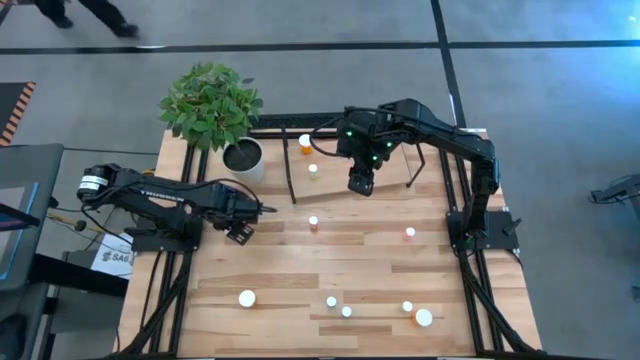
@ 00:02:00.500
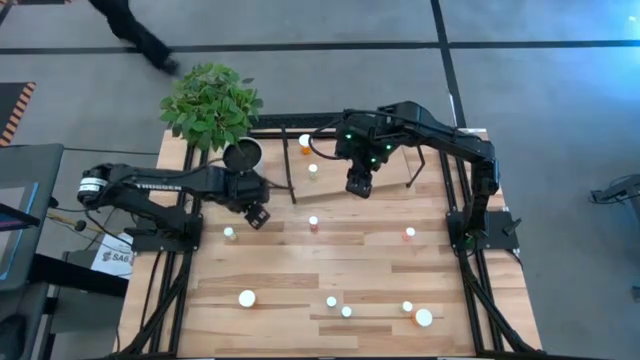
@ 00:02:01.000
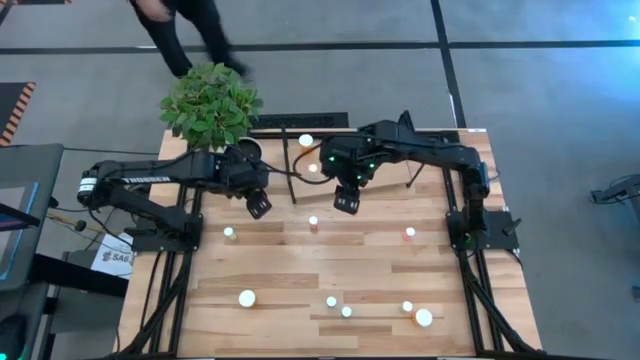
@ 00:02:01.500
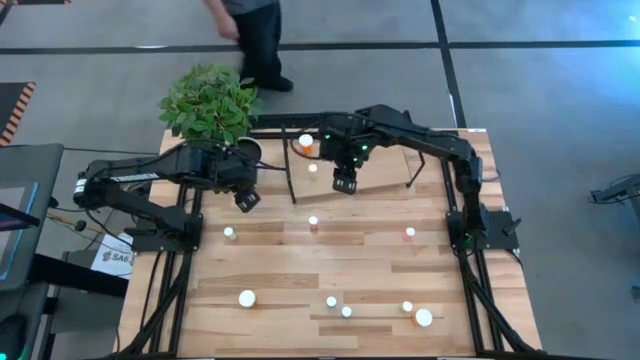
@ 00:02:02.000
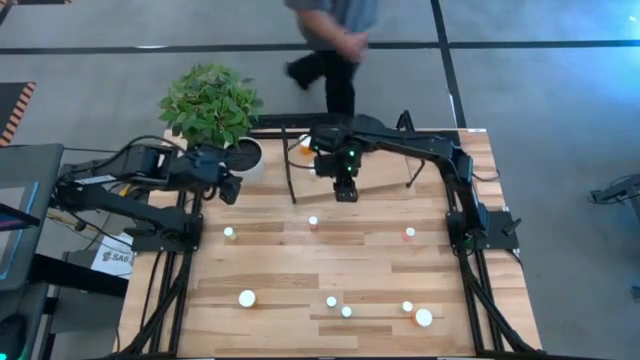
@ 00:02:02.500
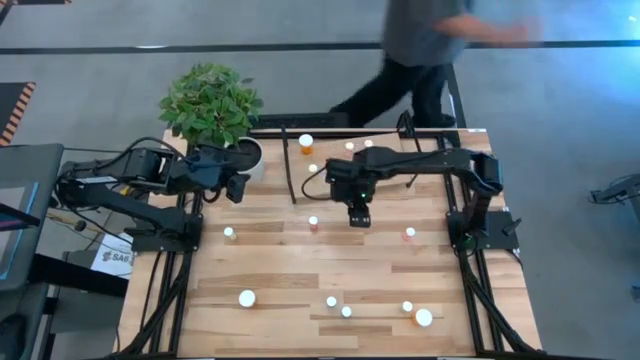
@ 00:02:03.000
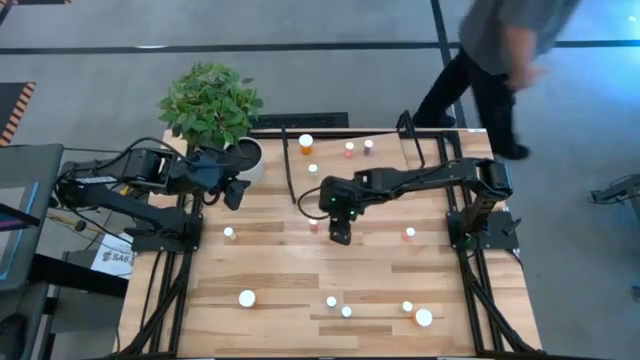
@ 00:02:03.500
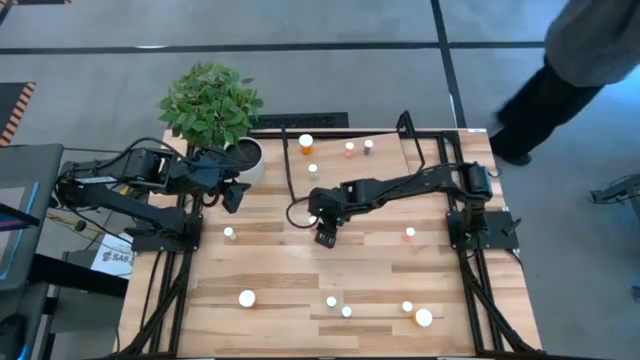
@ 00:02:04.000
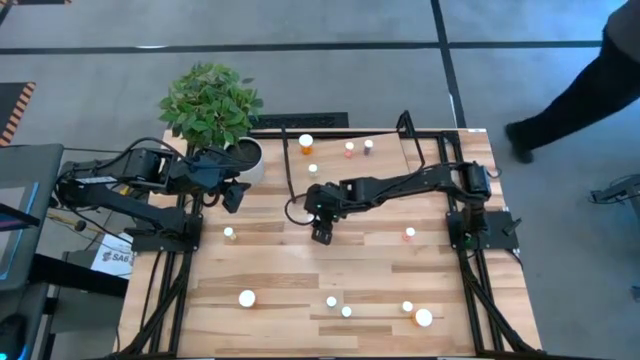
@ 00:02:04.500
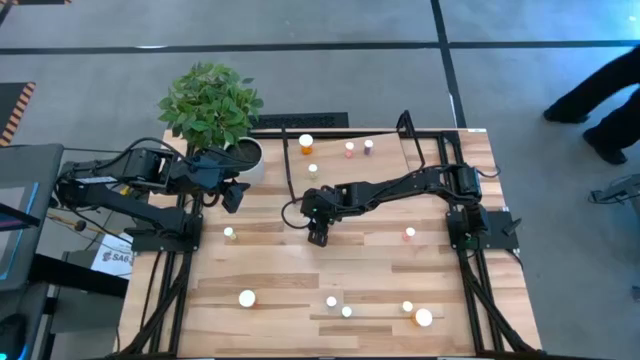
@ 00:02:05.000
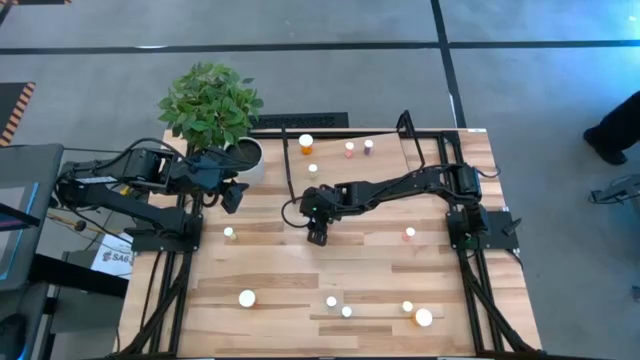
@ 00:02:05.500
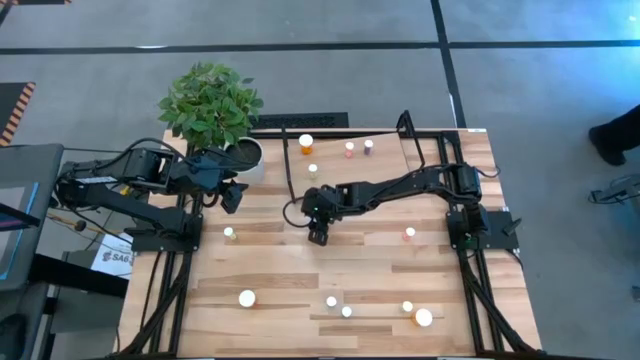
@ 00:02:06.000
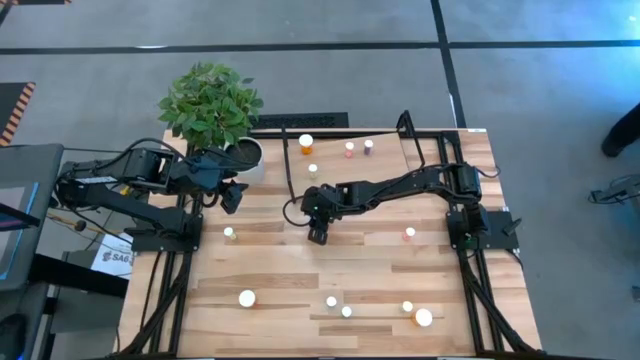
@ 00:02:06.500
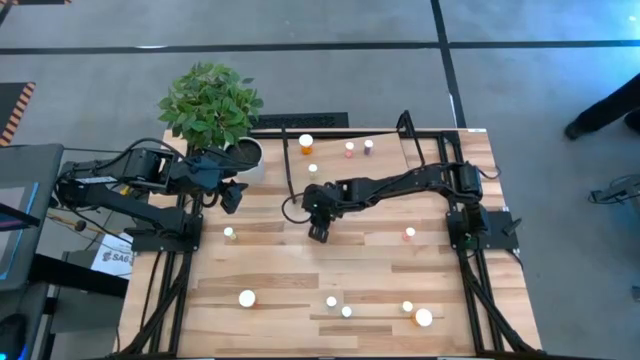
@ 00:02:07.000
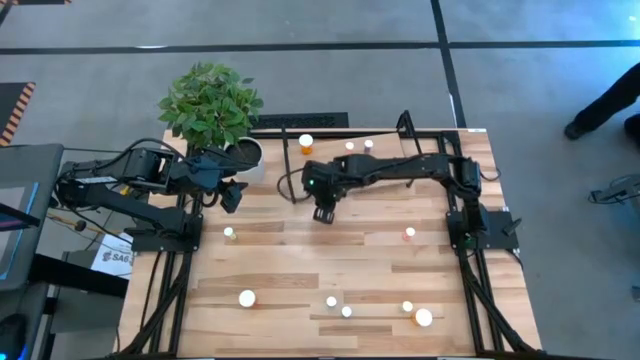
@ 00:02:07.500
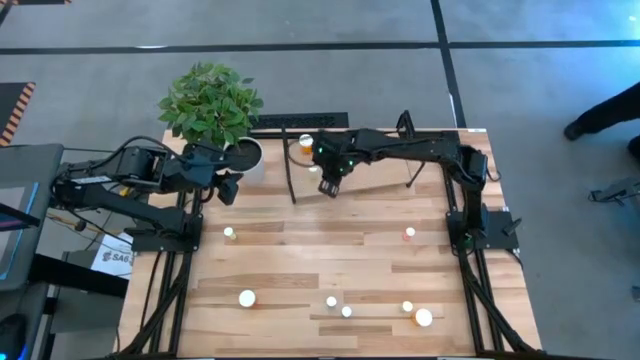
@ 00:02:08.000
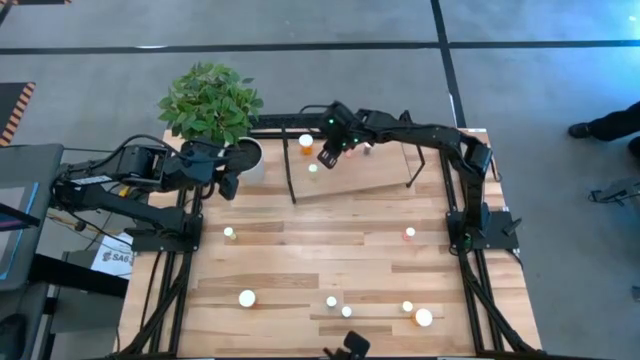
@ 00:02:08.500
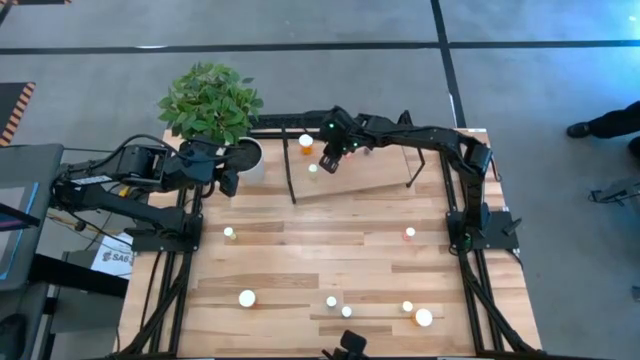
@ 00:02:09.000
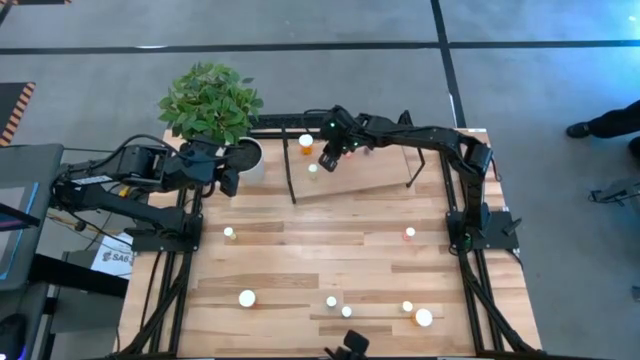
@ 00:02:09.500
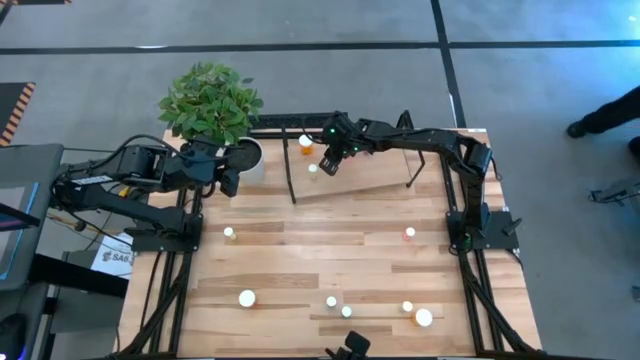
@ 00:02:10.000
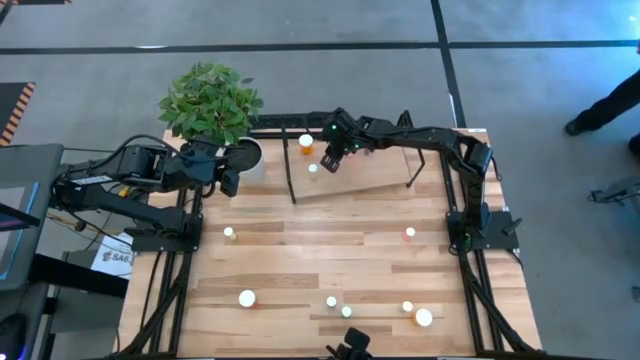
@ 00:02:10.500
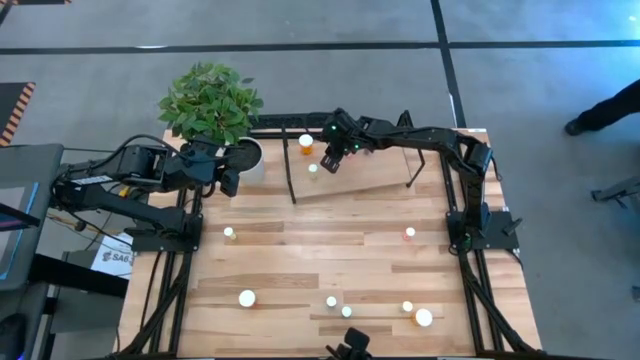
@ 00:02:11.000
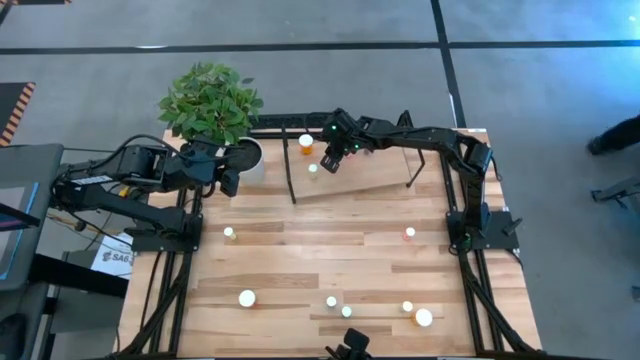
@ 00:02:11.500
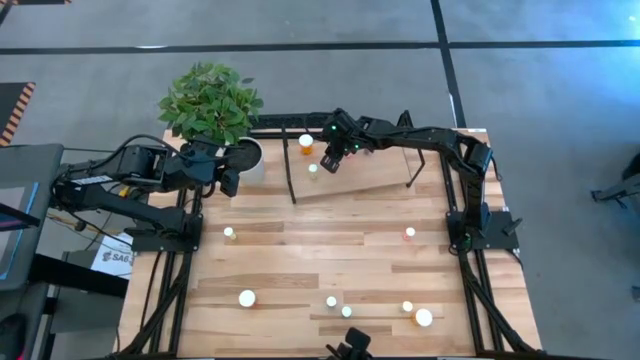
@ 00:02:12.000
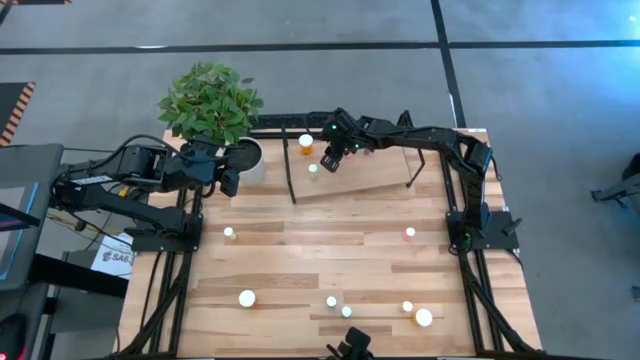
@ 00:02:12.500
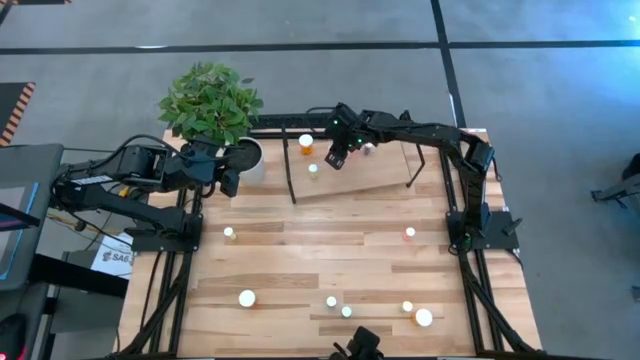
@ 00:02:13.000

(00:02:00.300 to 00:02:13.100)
Task: Pick and place medicine bottles onto shelf by color
Put the left pink pill bottle on the shelf

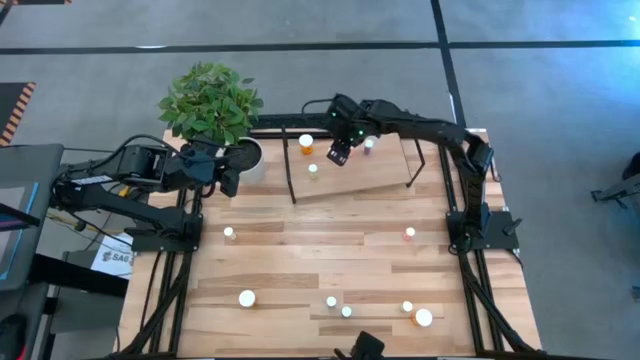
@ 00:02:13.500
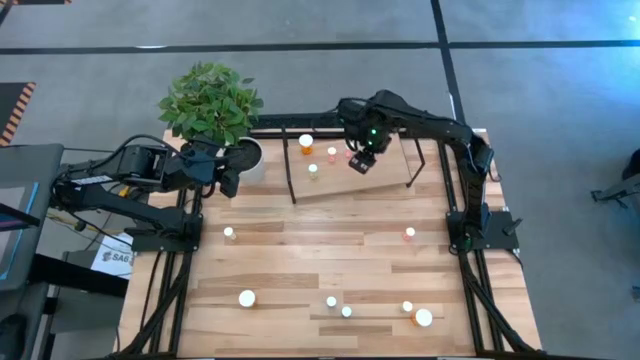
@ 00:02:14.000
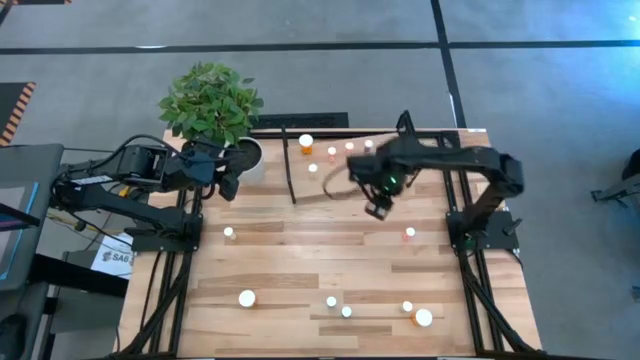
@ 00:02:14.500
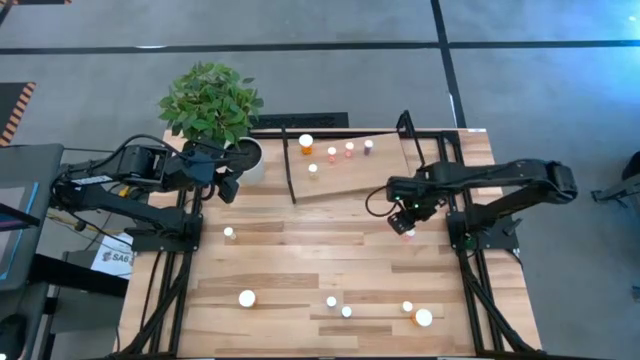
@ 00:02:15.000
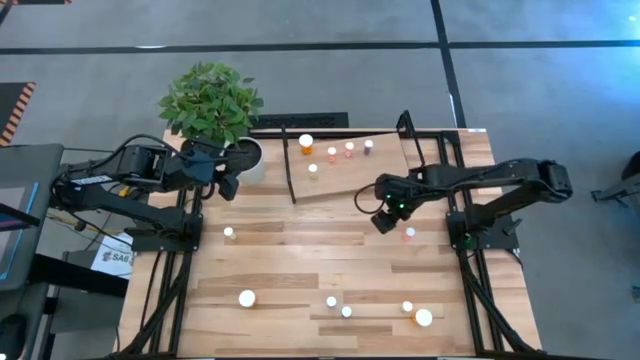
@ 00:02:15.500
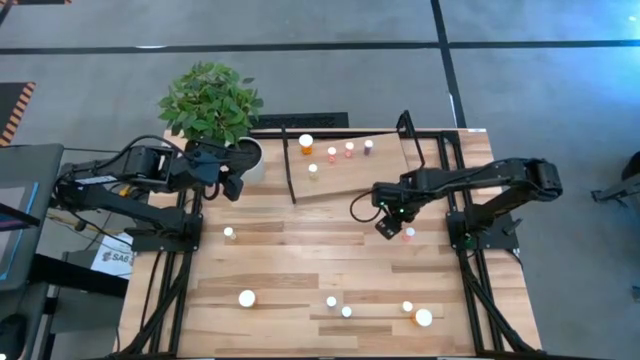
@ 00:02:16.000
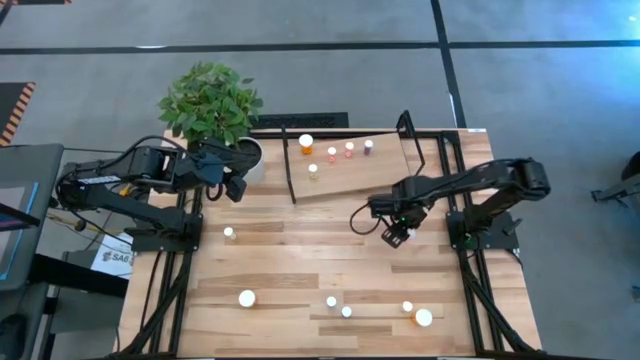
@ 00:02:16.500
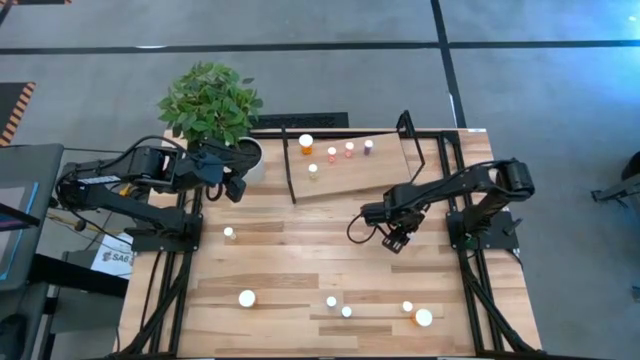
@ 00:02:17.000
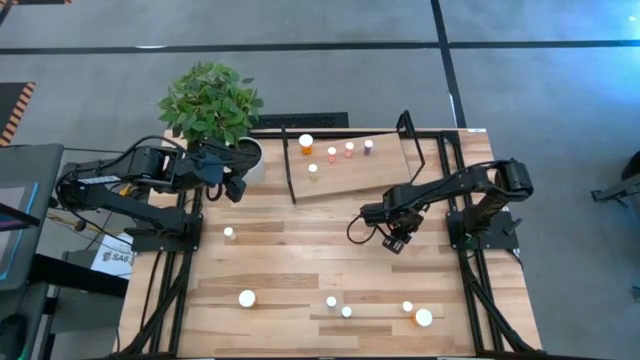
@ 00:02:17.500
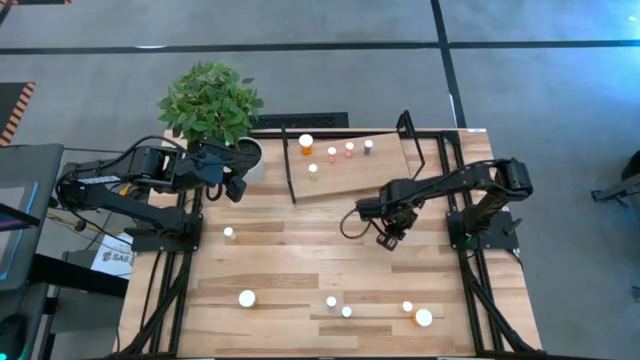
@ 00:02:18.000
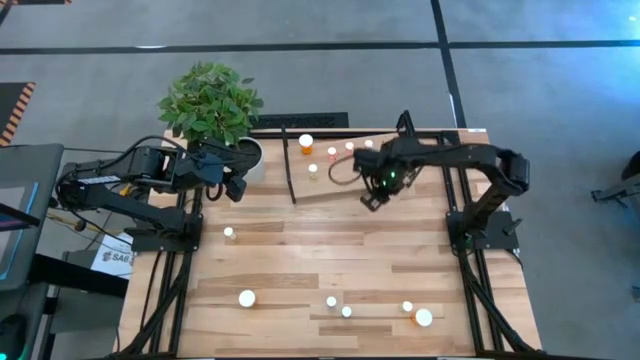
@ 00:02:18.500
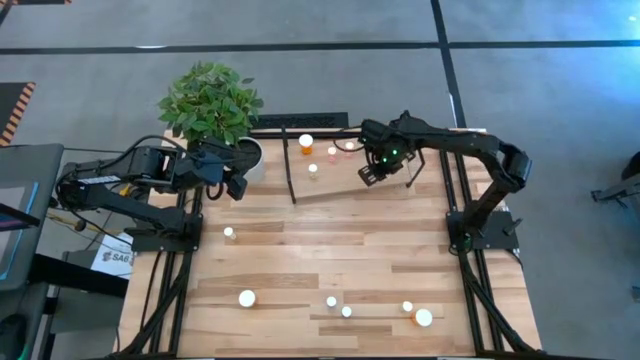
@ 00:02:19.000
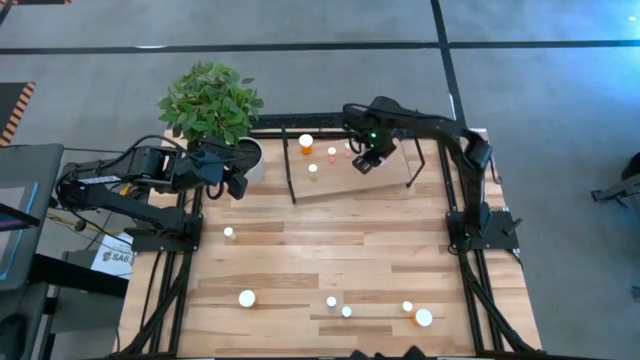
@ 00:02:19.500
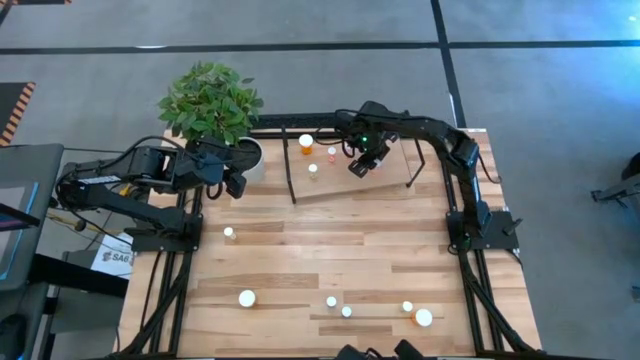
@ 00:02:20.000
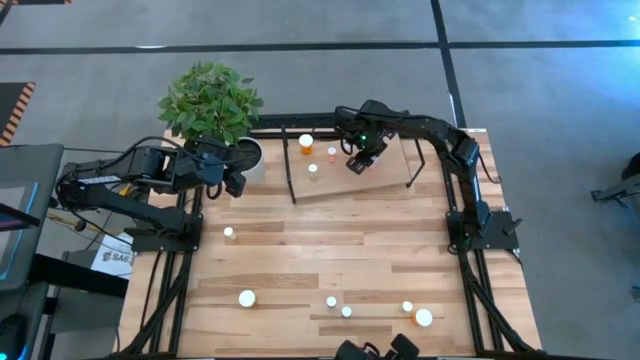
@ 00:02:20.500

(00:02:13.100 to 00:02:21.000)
Put the pink pill bottle on the shelf
